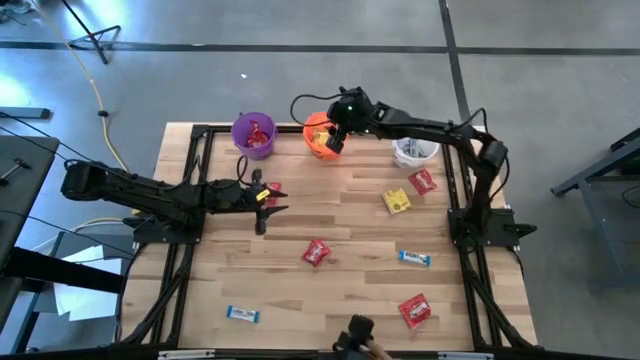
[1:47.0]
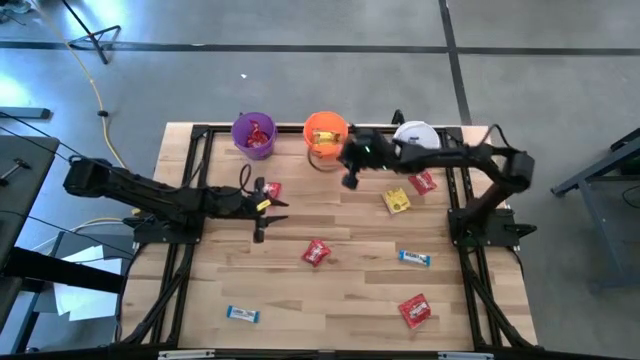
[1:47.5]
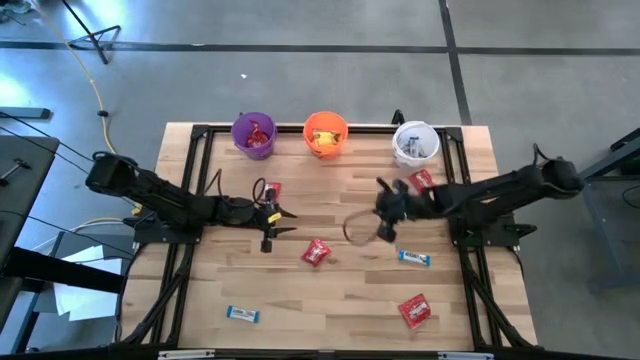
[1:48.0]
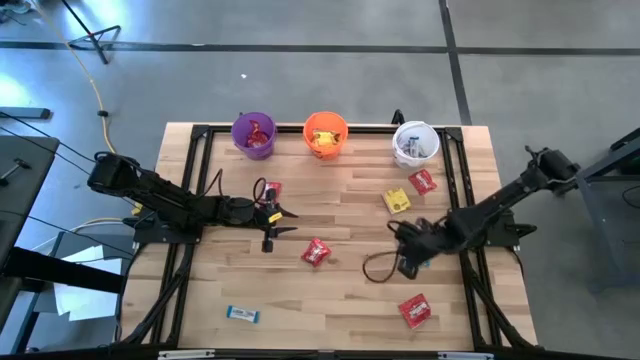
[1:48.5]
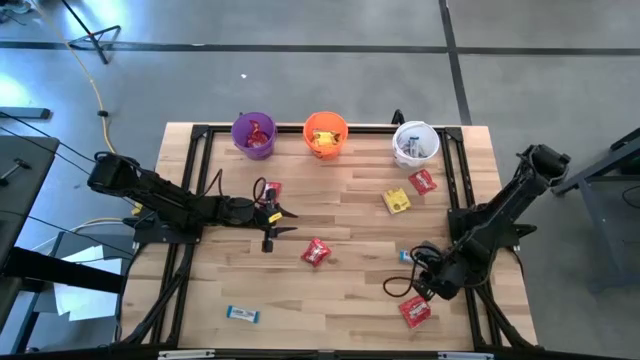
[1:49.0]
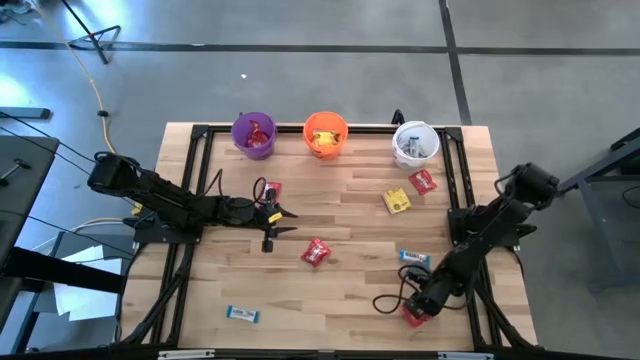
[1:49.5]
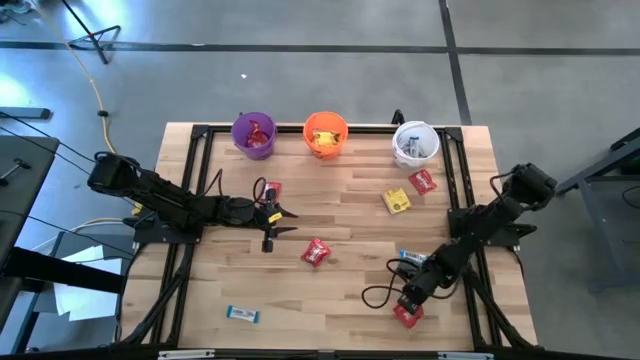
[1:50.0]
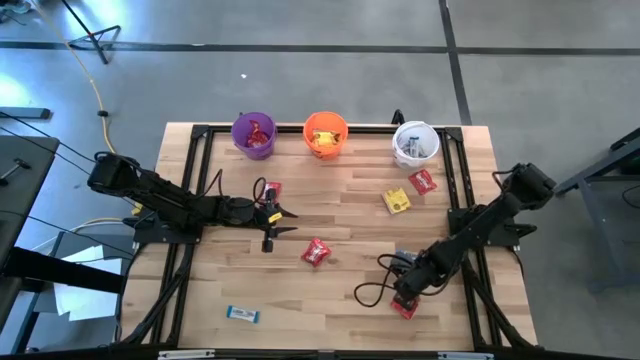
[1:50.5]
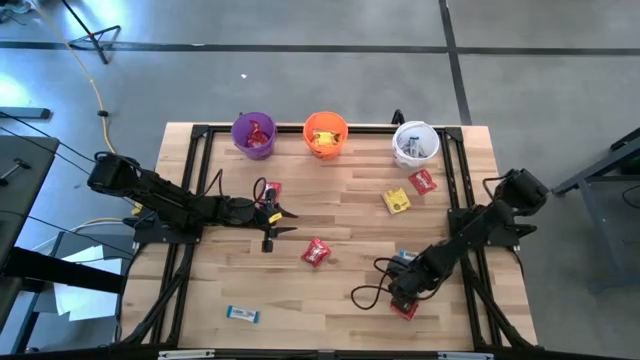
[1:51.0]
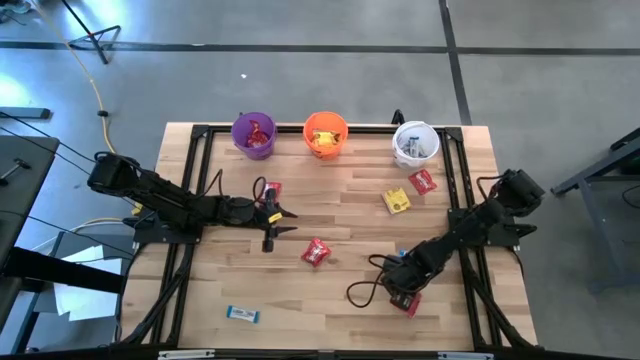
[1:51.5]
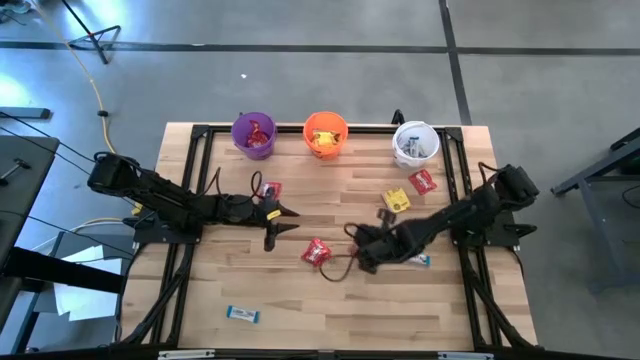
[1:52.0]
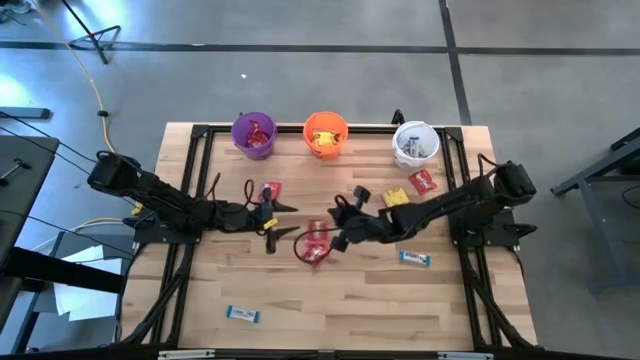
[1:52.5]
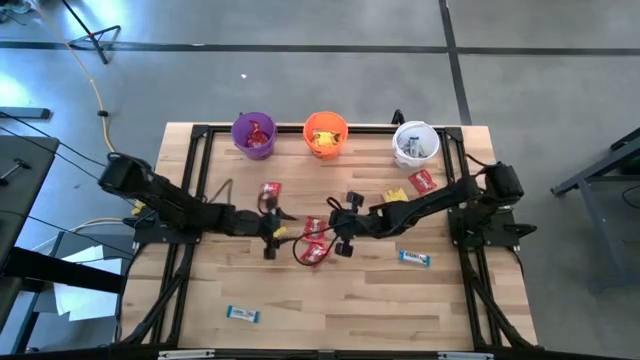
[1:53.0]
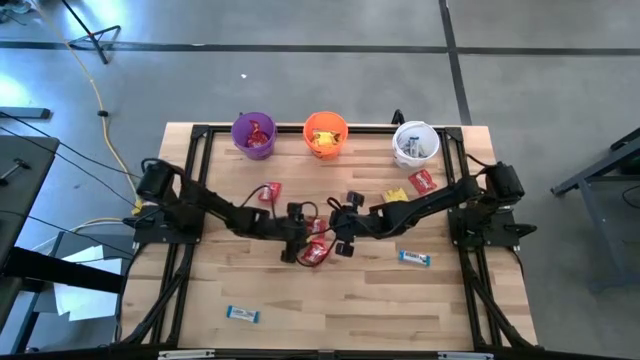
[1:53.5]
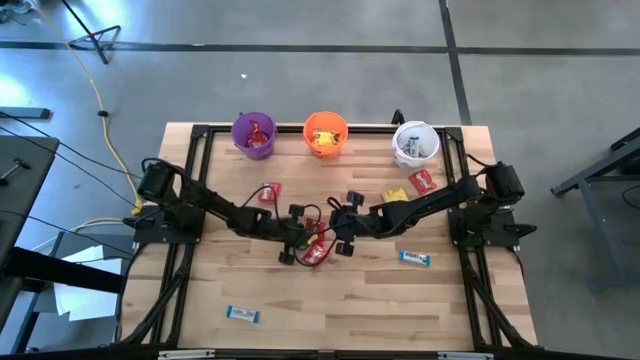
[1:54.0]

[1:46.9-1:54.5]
Task: Sort candy
Put the red candy into the violet bucket

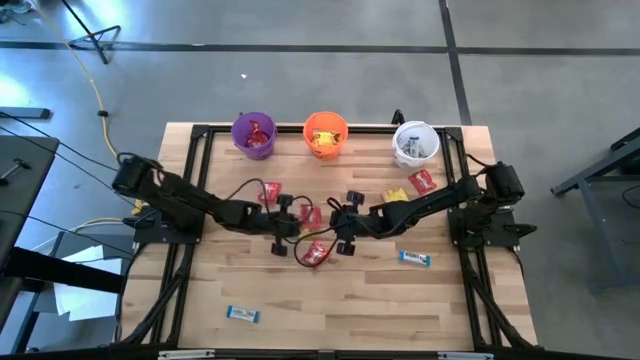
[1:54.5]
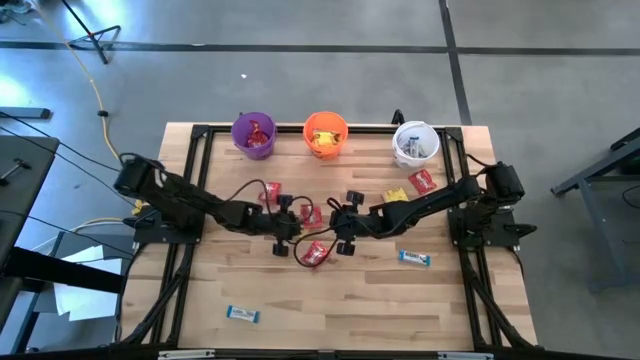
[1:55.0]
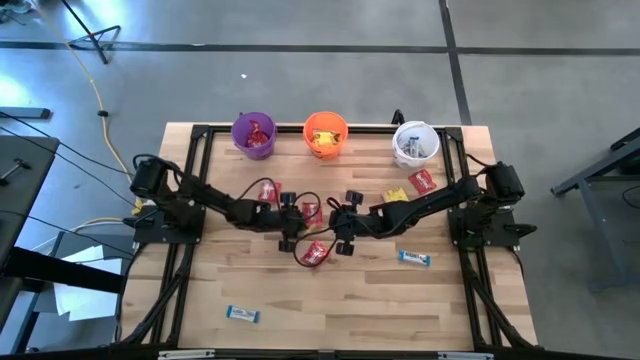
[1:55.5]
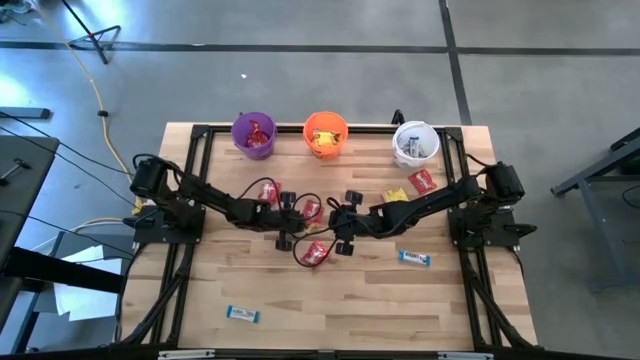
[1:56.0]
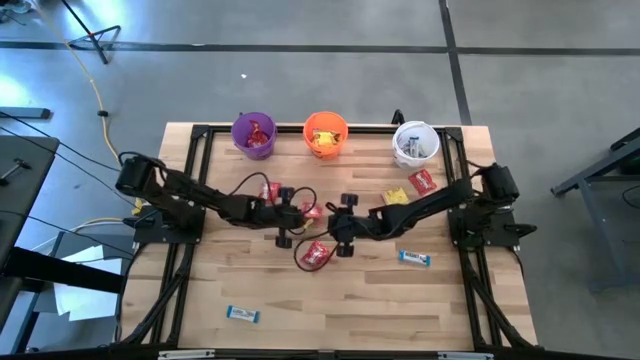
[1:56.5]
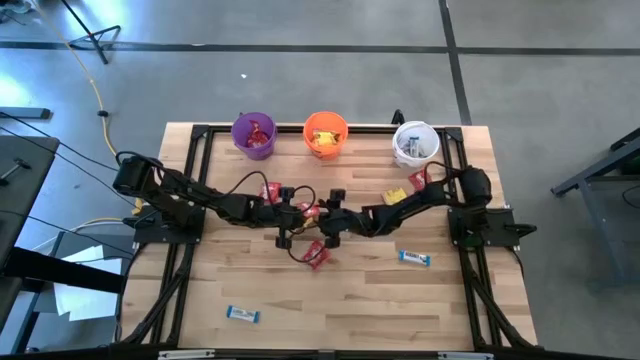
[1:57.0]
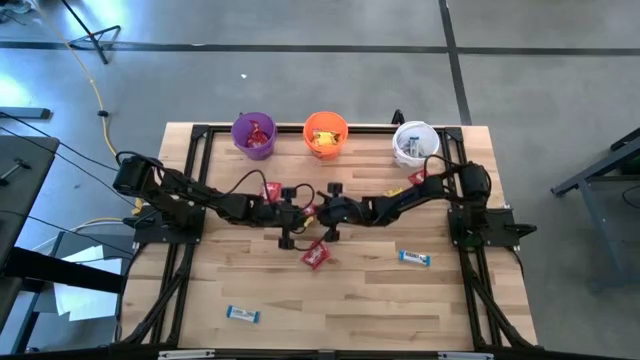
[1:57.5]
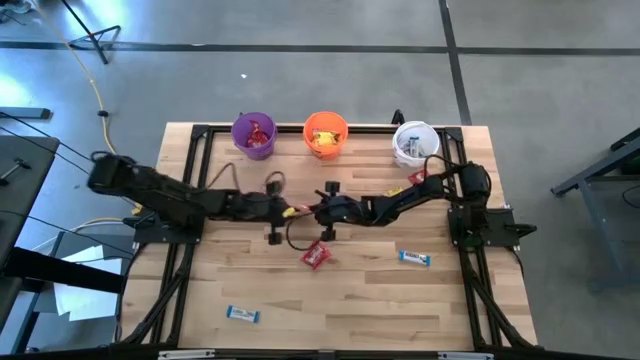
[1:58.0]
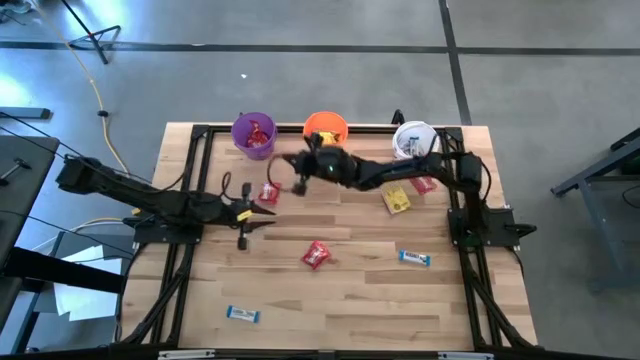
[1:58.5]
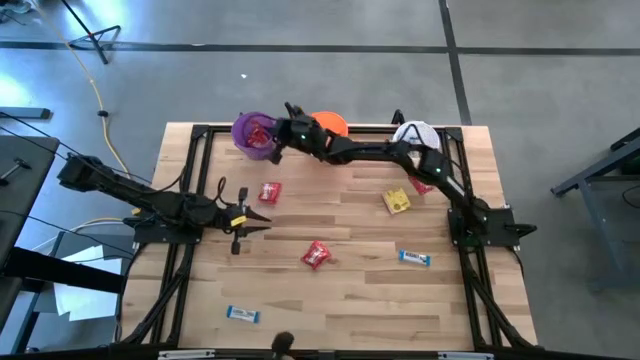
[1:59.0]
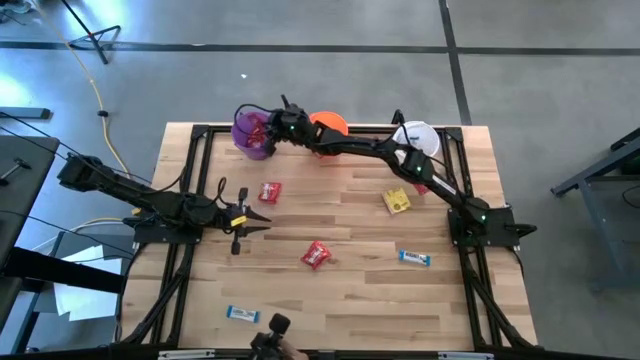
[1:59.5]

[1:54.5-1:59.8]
Put the red candy into the violet bucket

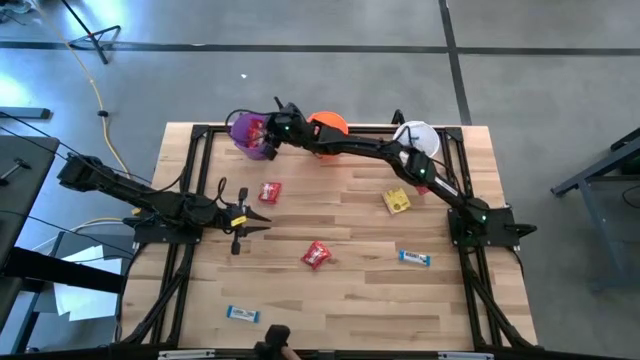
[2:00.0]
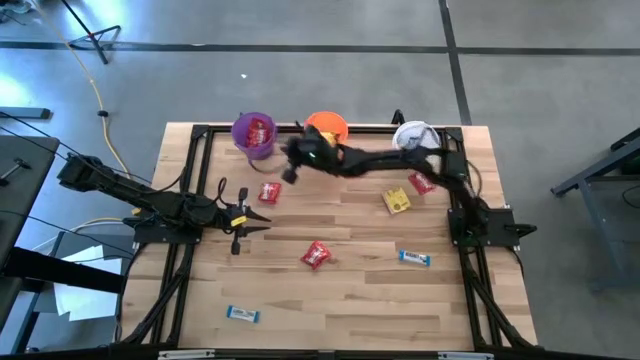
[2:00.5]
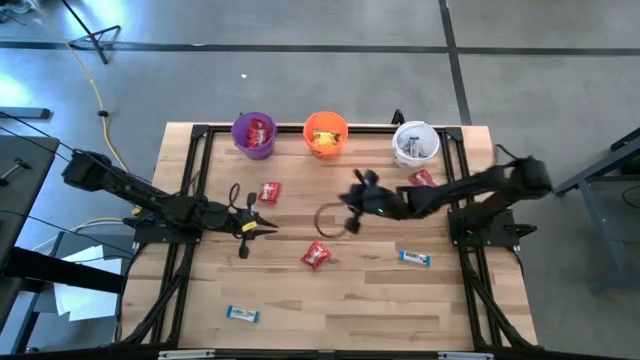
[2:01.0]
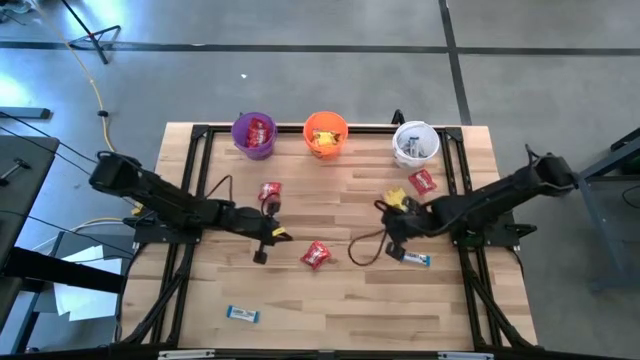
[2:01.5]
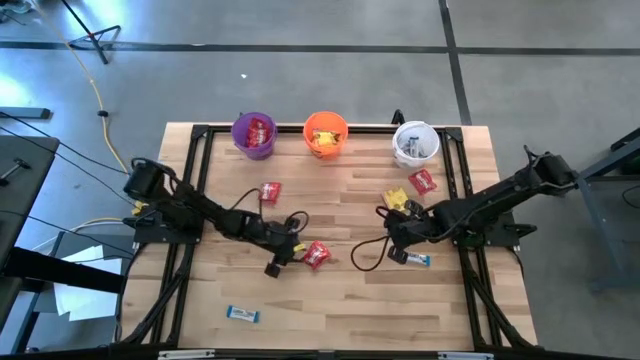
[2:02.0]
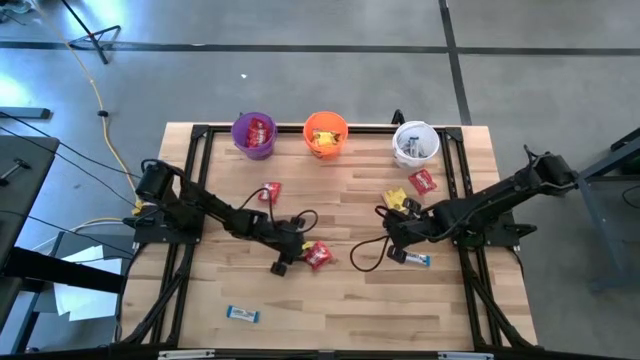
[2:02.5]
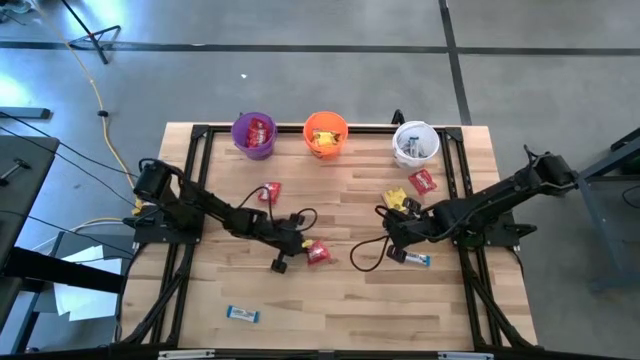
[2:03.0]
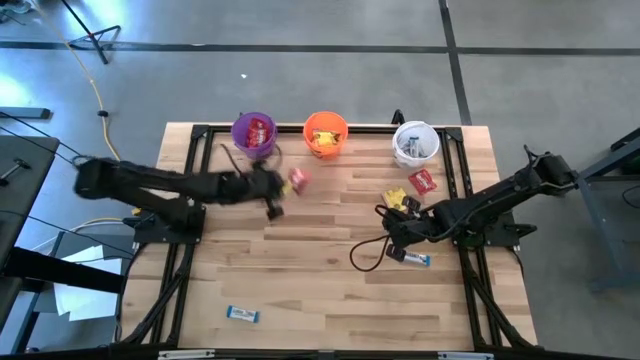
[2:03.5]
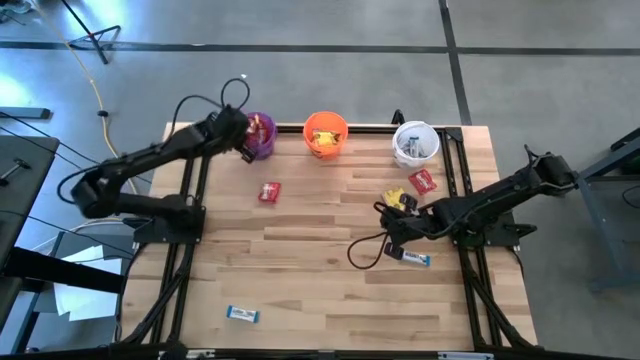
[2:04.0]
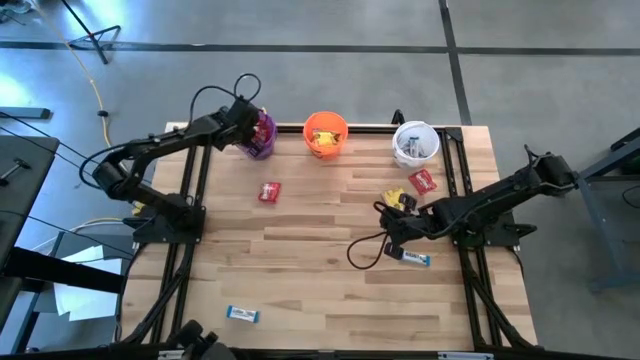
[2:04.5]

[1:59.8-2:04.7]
Put the red candy into the violet bucket

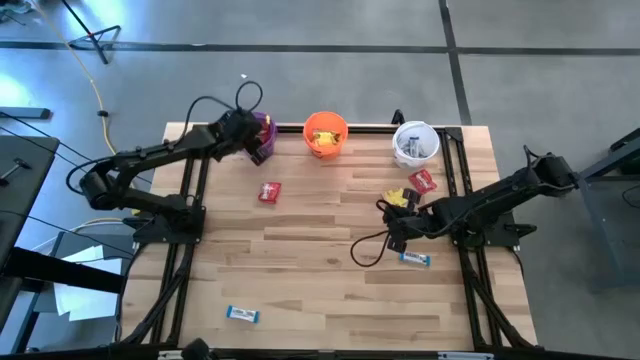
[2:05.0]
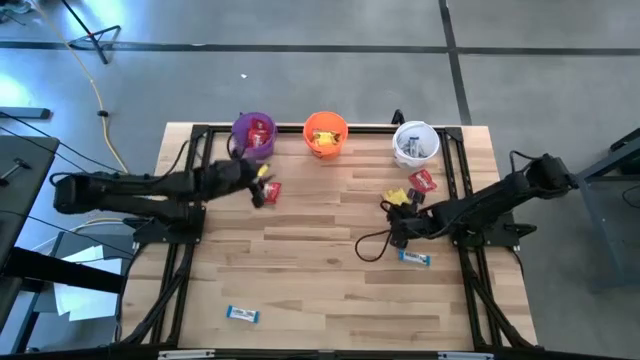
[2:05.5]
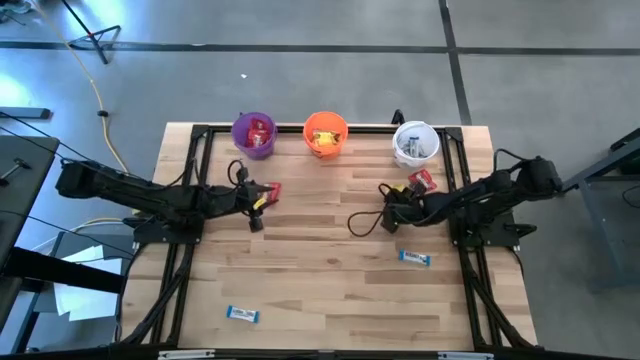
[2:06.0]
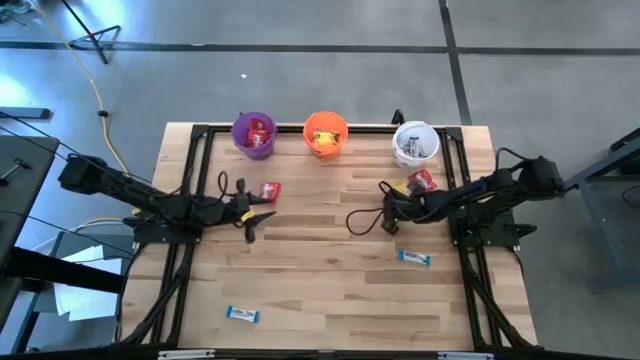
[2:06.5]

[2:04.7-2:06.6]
Put the yellow candy into the orange bucket

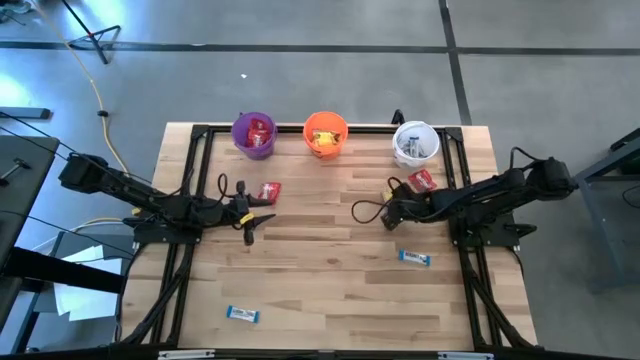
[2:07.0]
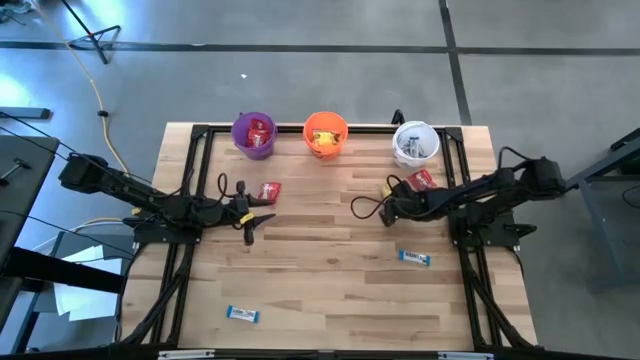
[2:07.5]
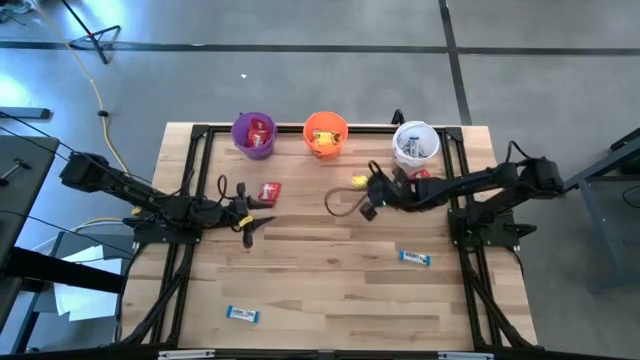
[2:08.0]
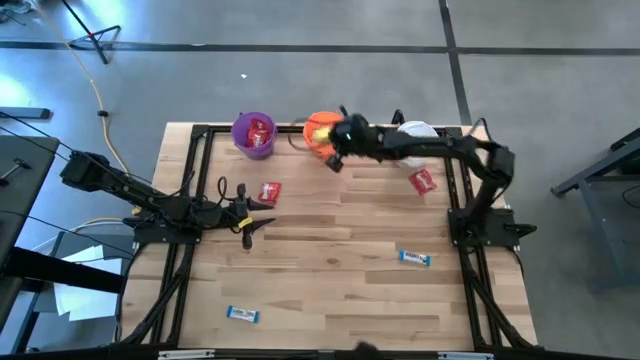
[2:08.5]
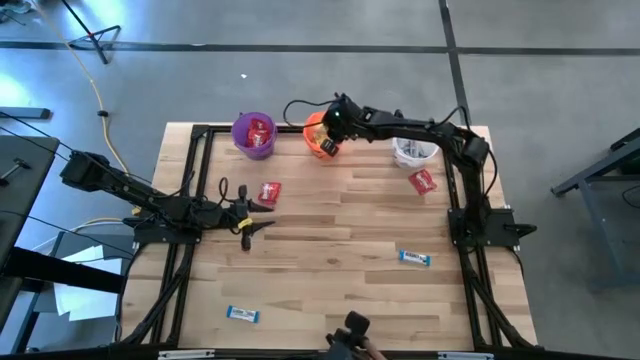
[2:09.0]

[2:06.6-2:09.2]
Put the yellow candy into the orange bucket
